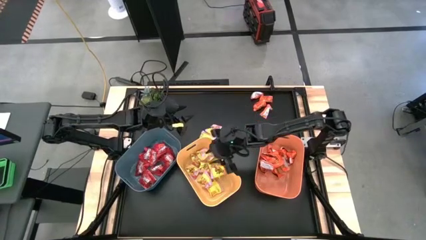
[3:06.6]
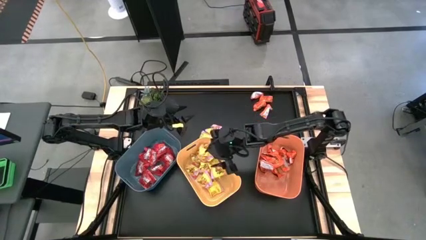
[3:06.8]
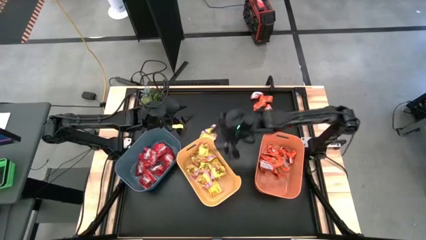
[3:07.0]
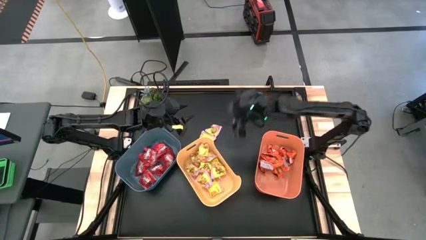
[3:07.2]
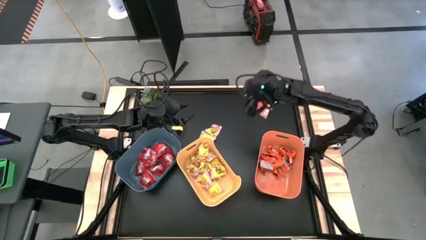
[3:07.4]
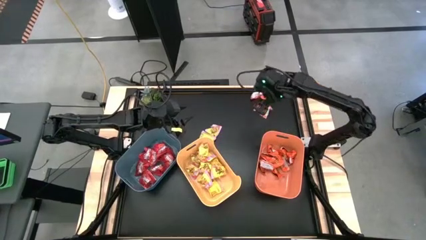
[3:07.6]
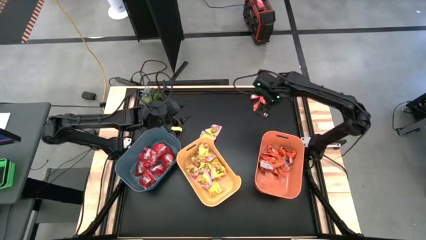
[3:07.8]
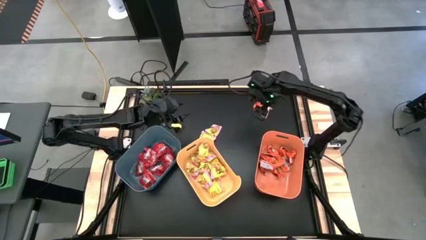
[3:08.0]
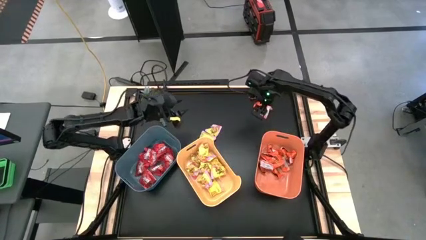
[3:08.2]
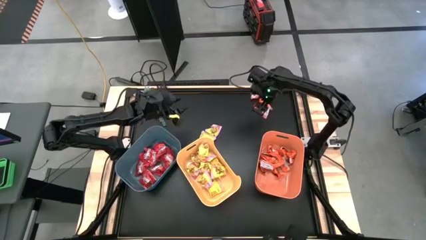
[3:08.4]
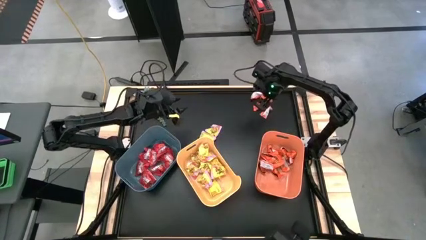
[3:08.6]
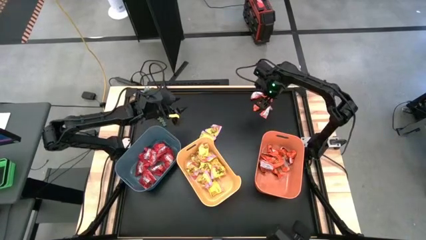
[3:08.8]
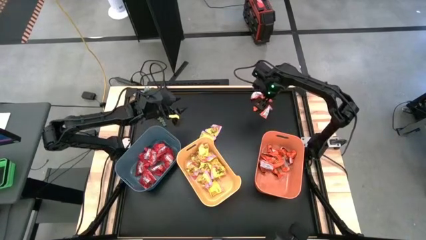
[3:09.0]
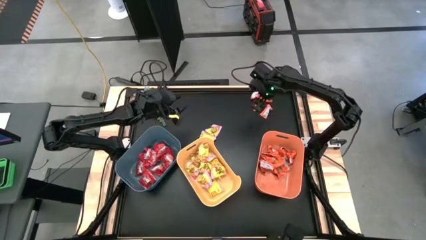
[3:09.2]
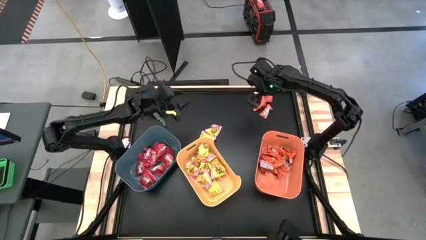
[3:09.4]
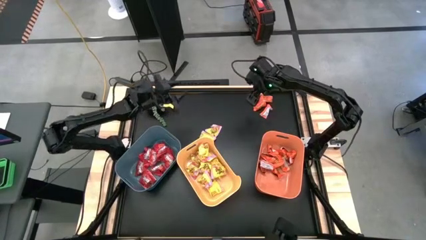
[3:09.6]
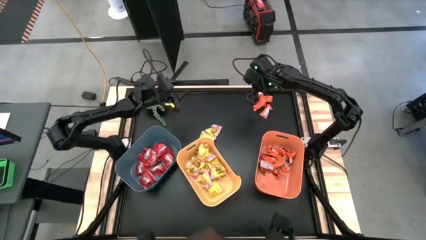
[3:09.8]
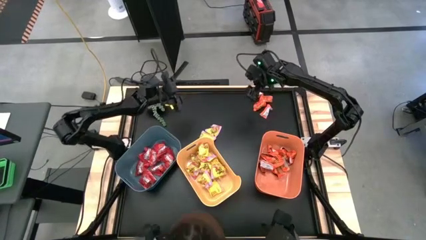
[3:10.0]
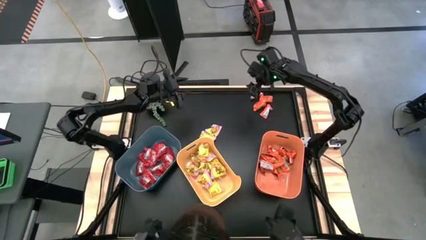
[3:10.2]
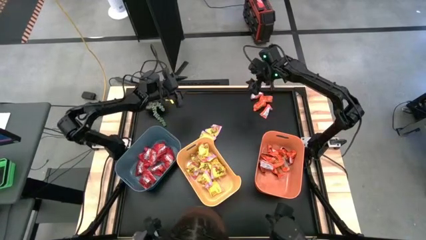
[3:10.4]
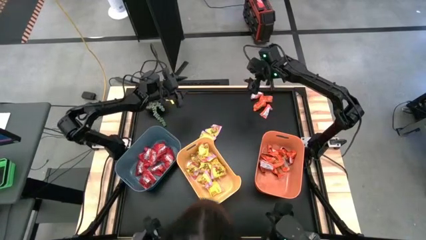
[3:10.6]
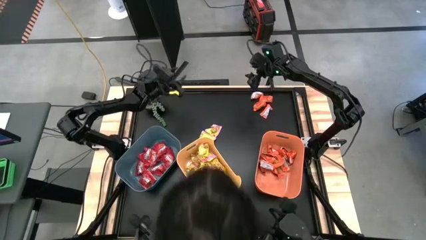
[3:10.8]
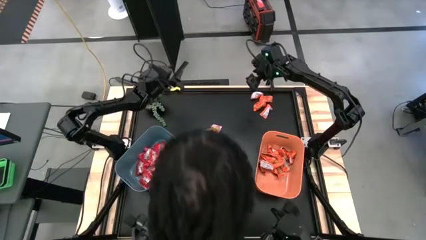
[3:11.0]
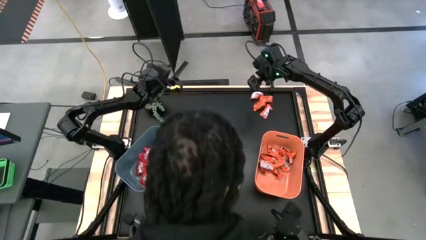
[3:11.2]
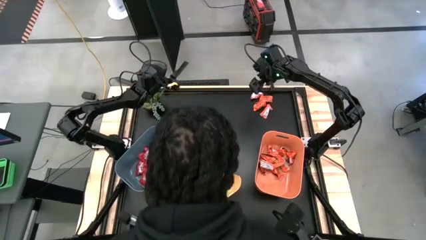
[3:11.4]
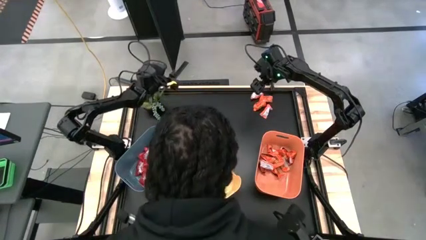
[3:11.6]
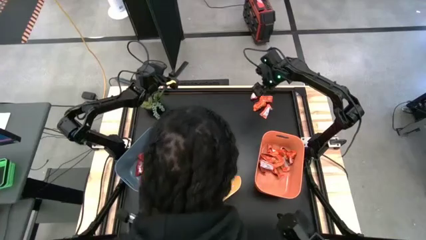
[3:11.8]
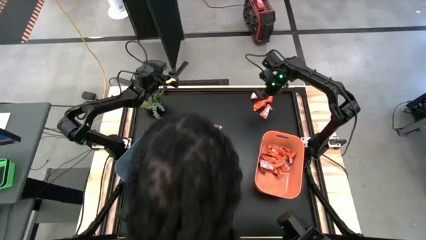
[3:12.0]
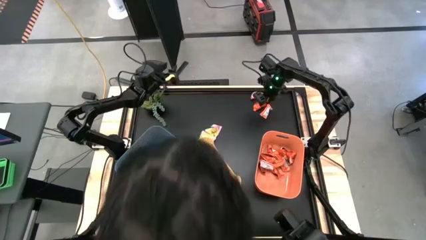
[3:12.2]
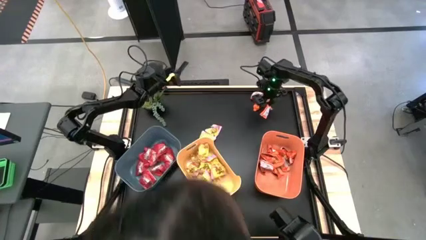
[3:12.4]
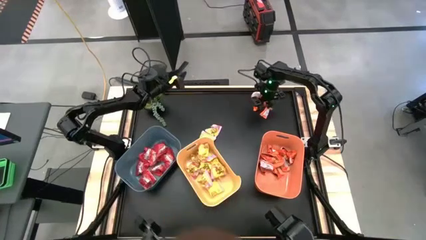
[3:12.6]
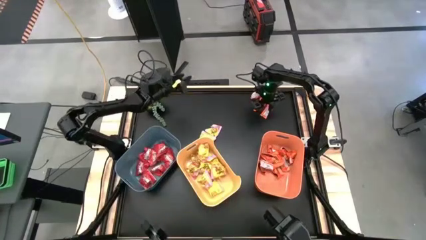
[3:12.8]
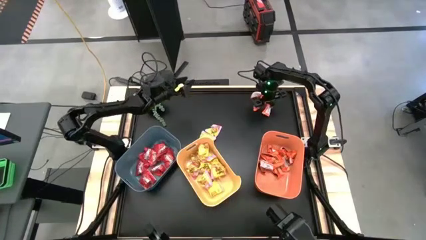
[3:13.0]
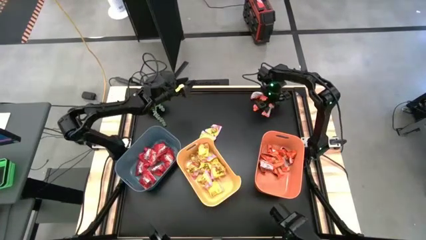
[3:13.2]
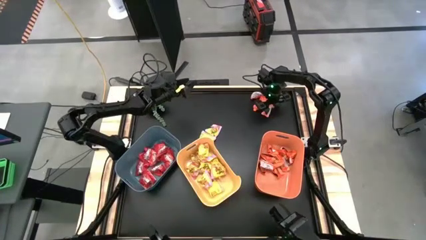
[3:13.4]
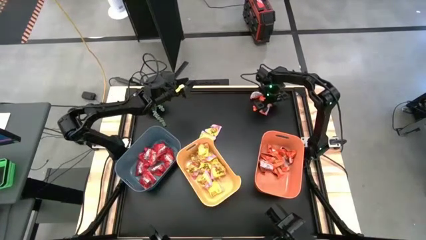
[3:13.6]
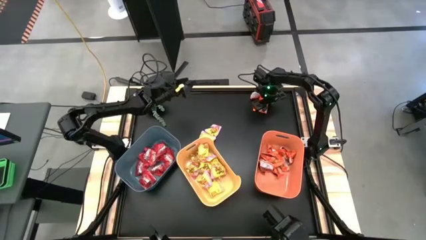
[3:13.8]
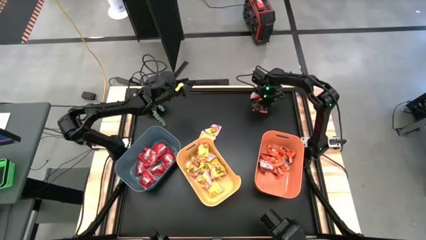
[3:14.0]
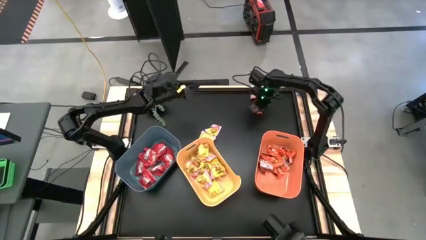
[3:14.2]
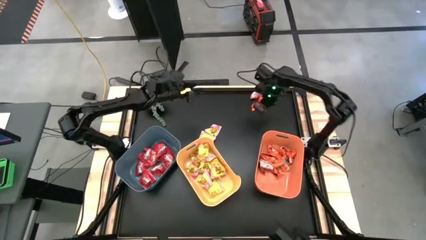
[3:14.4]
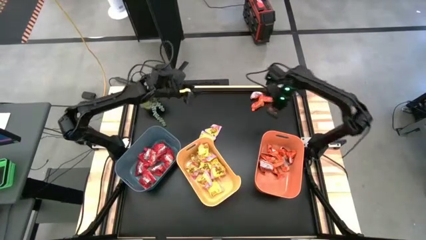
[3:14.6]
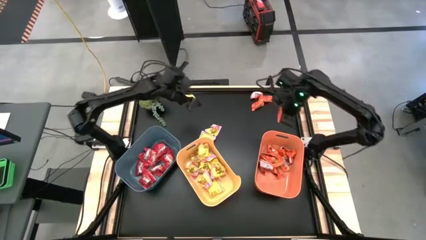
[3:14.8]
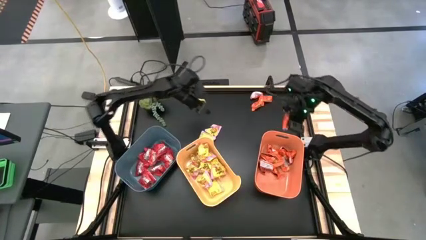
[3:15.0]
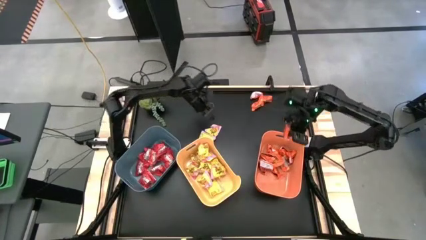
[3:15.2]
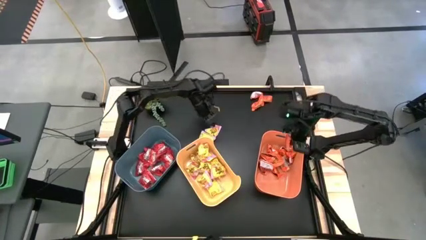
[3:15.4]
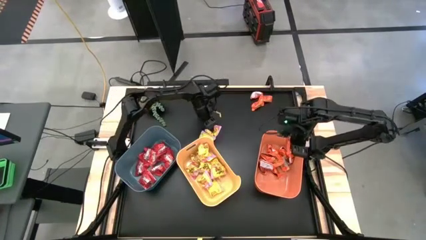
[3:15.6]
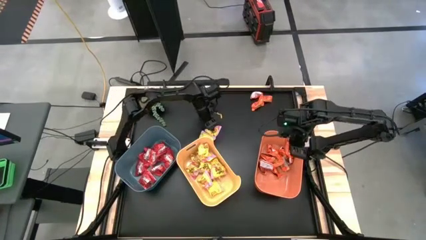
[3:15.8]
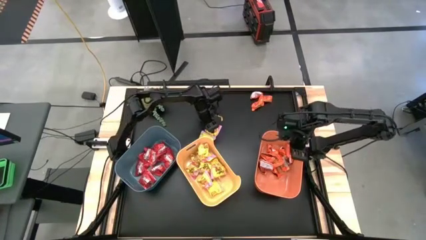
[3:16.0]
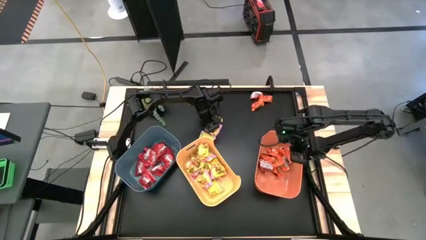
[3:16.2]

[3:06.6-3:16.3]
Task: Sort candy
Put the orange chocolate into the orange bin

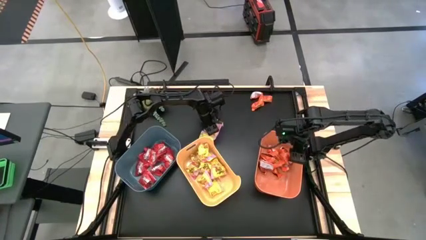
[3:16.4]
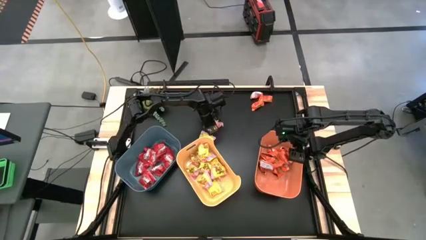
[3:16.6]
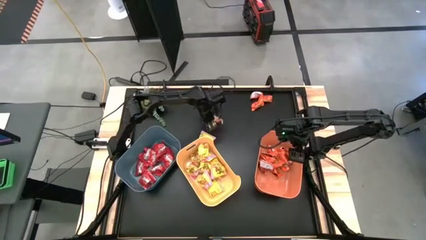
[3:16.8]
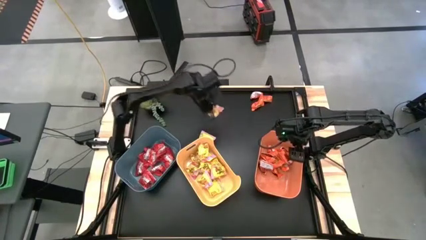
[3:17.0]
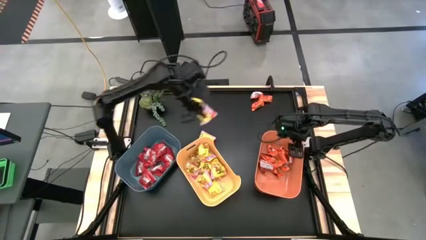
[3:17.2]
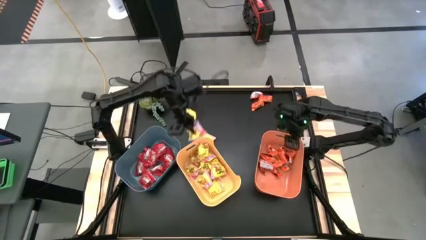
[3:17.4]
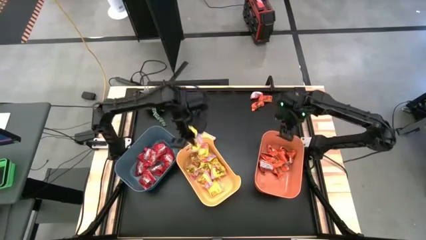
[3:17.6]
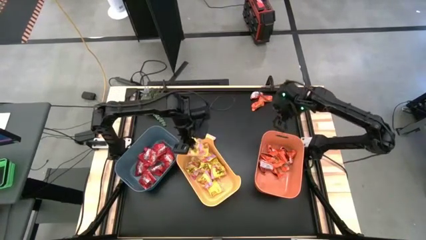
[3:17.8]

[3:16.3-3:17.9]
Put the yellow candy into the yellow bin

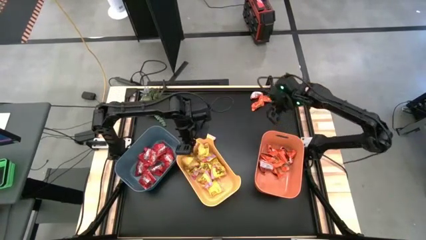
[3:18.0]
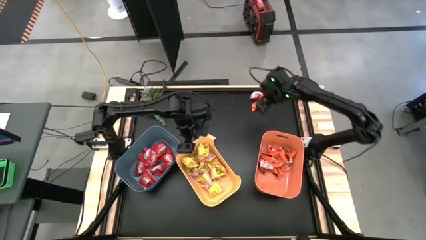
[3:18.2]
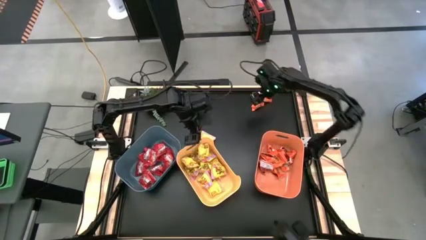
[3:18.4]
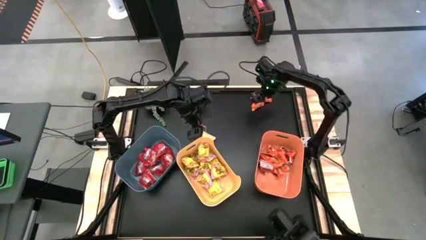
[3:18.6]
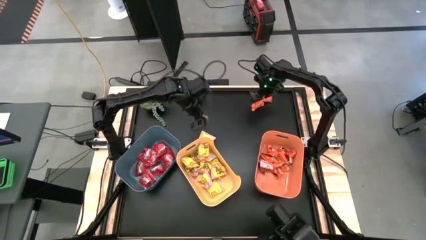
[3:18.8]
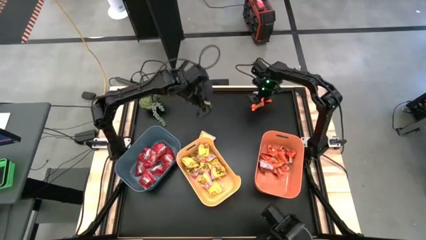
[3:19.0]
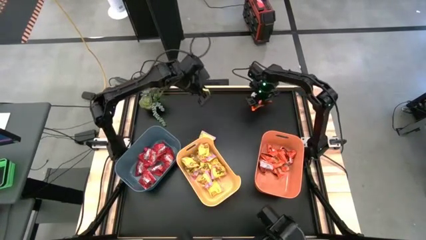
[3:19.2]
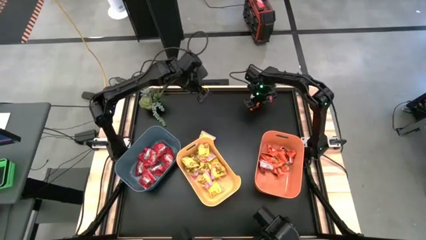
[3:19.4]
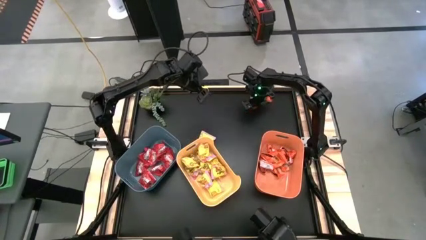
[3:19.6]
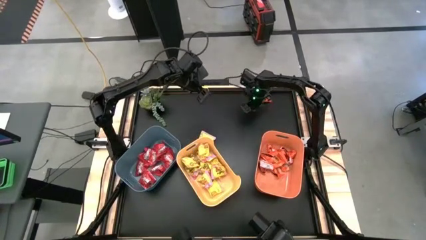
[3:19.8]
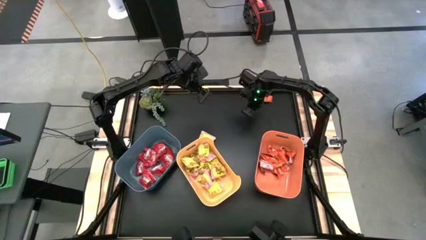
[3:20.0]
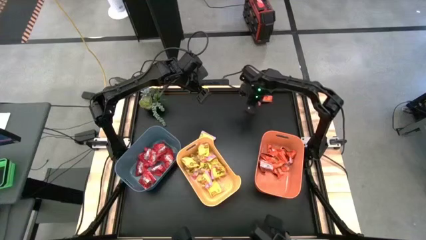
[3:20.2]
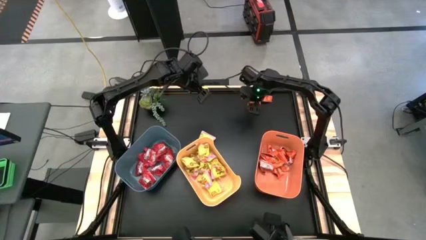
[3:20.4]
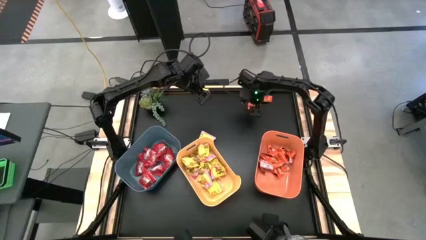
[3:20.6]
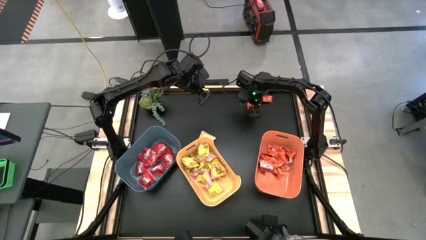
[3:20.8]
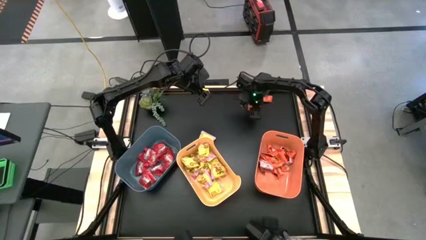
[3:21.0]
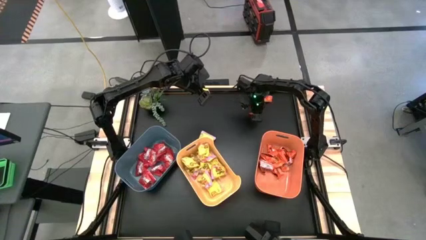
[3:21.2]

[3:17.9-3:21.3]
Put the orange chocolate into the orange bin

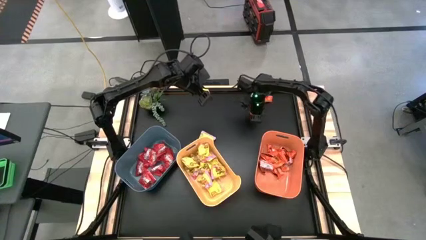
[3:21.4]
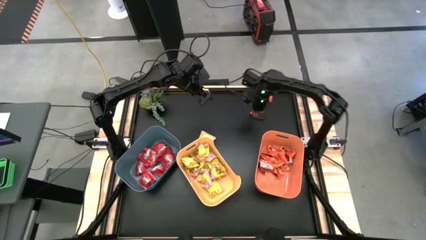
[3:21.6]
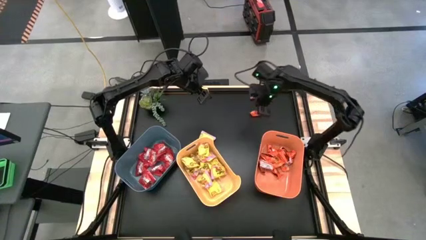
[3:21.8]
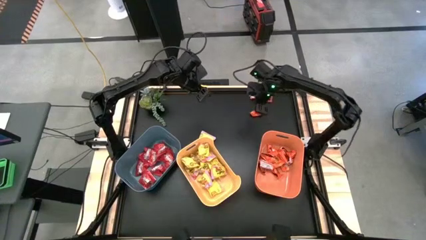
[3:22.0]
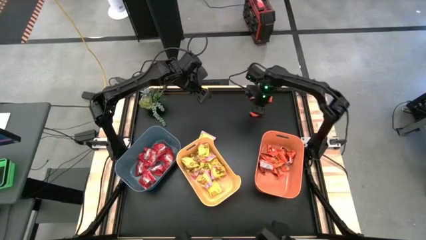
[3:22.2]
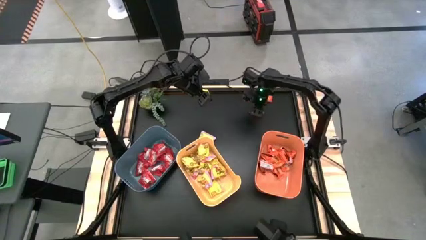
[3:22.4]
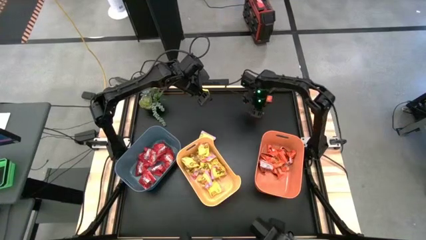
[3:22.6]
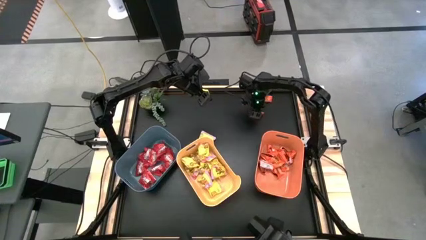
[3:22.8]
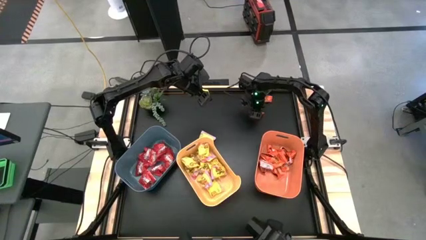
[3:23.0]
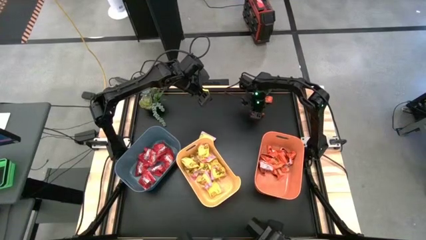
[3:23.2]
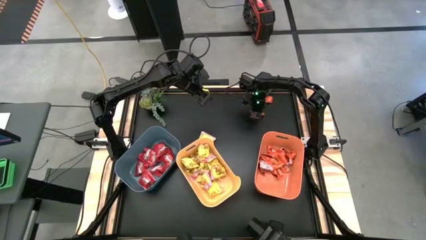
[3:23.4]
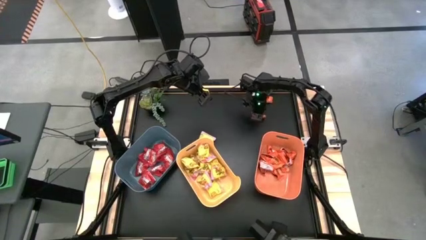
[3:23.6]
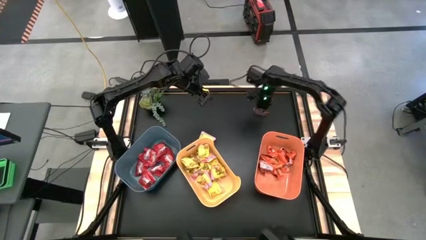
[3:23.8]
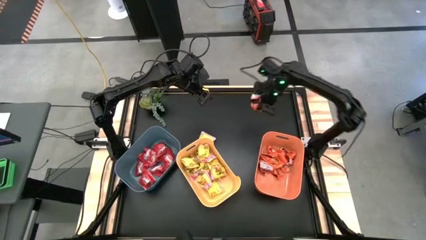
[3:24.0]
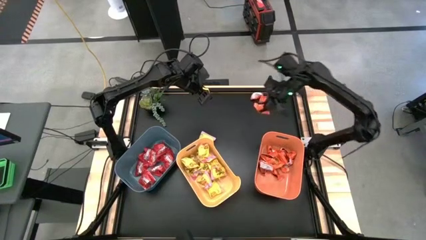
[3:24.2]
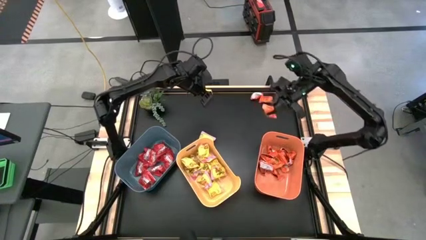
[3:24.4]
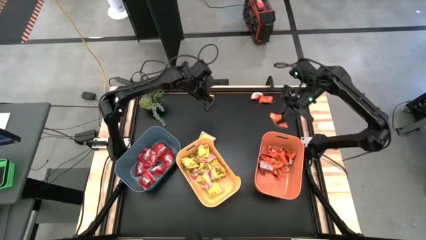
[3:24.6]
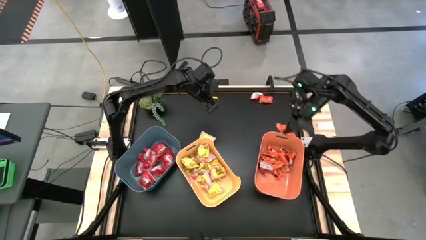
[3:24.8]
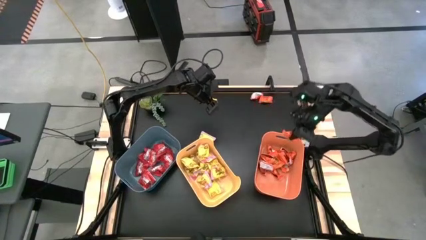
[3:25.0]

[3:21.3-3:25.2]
Put the orange candy into the orange bin
